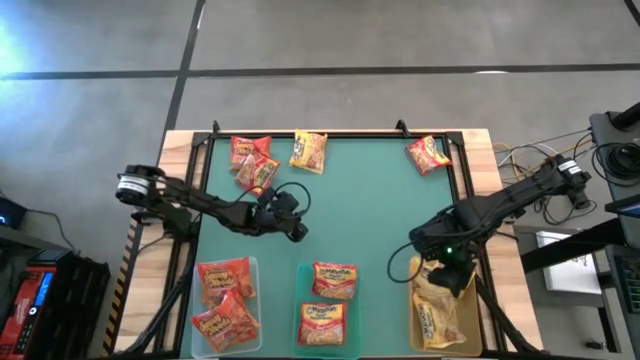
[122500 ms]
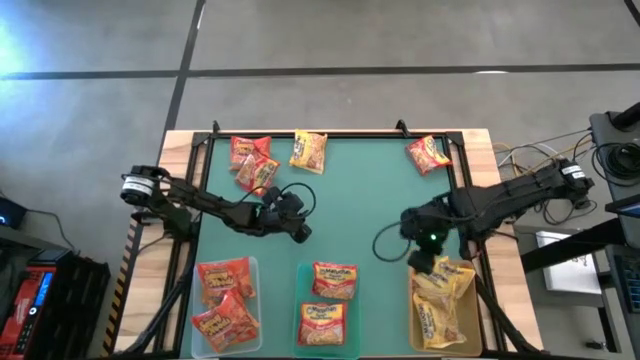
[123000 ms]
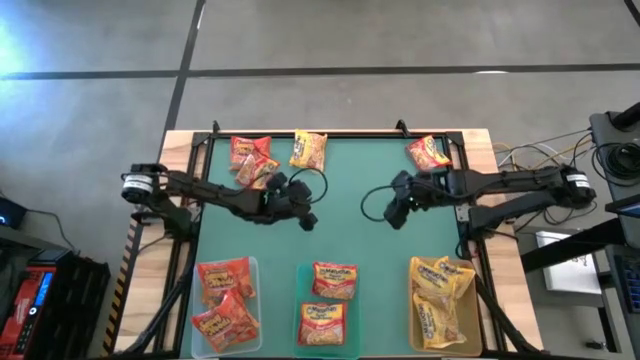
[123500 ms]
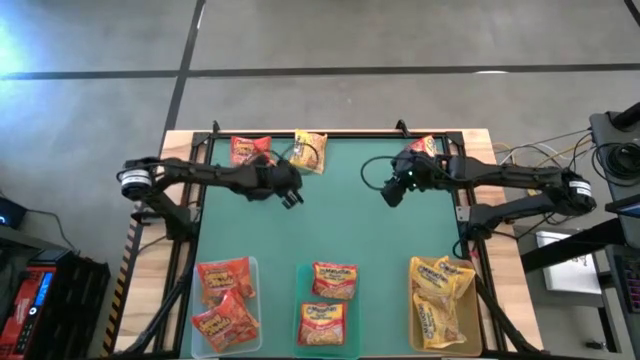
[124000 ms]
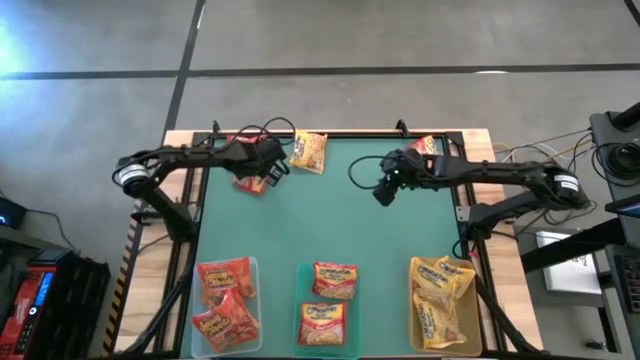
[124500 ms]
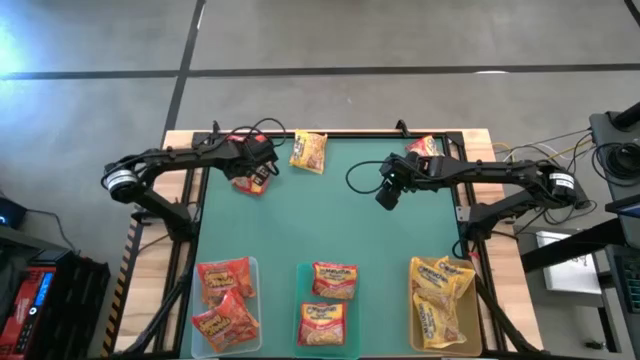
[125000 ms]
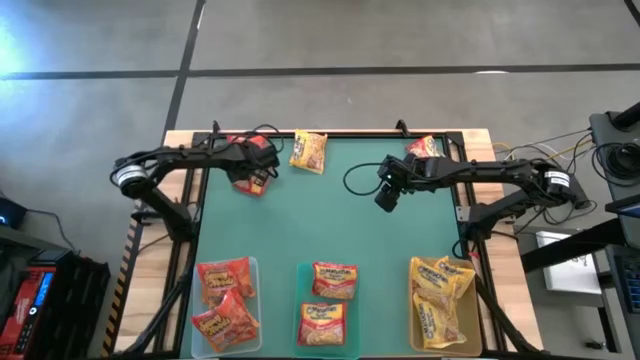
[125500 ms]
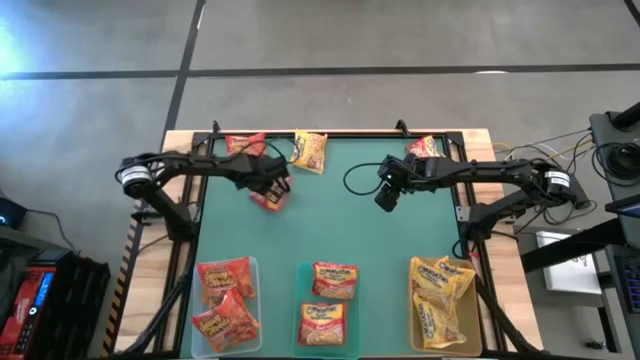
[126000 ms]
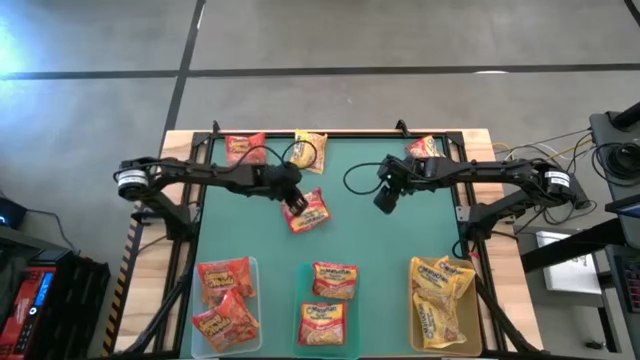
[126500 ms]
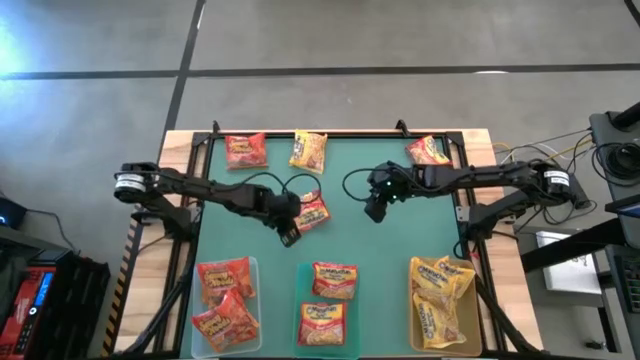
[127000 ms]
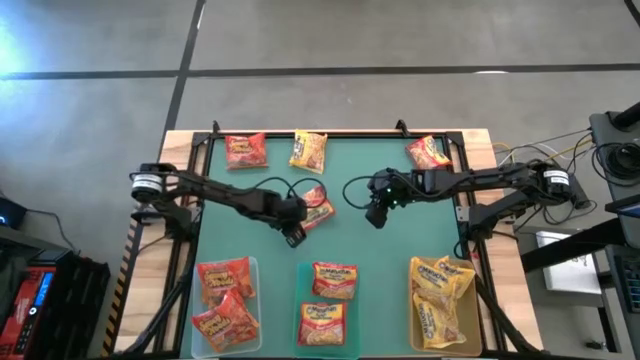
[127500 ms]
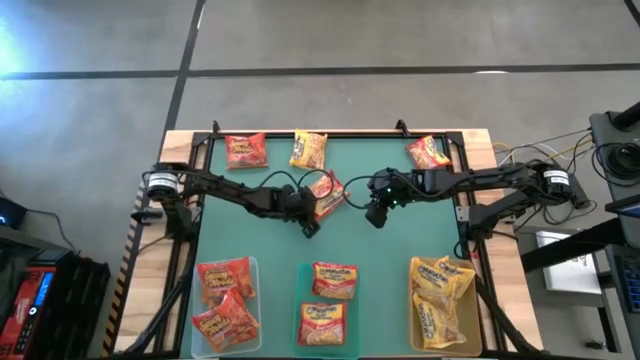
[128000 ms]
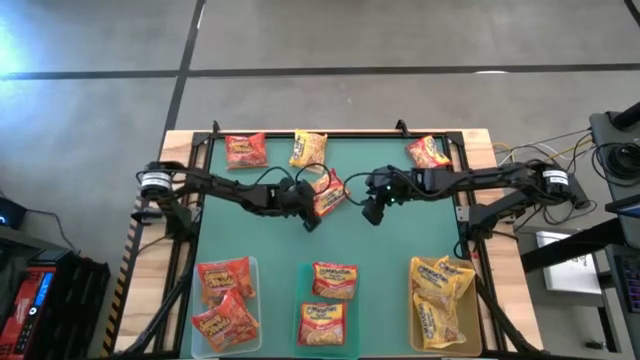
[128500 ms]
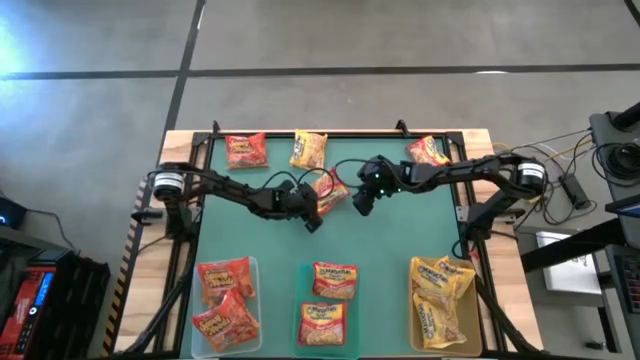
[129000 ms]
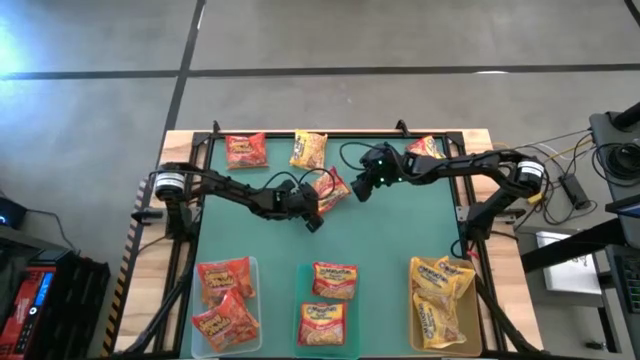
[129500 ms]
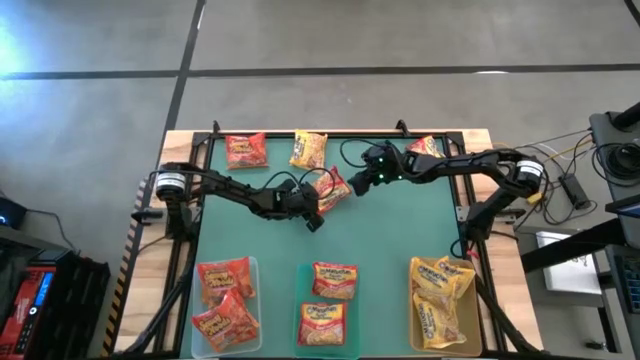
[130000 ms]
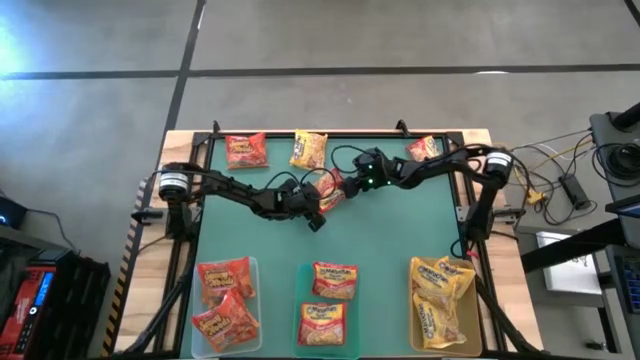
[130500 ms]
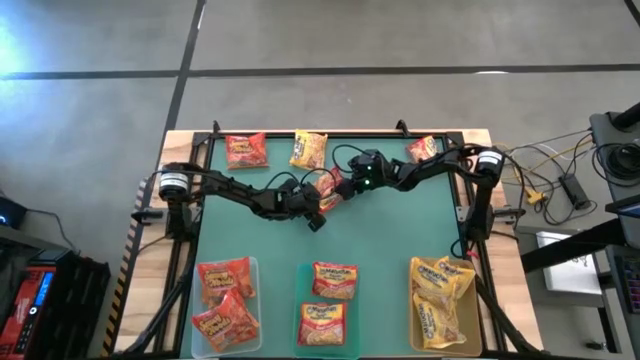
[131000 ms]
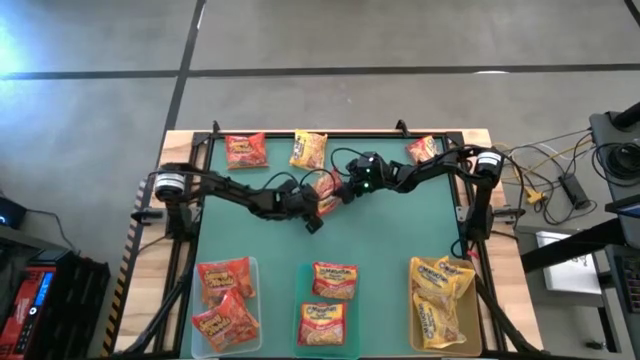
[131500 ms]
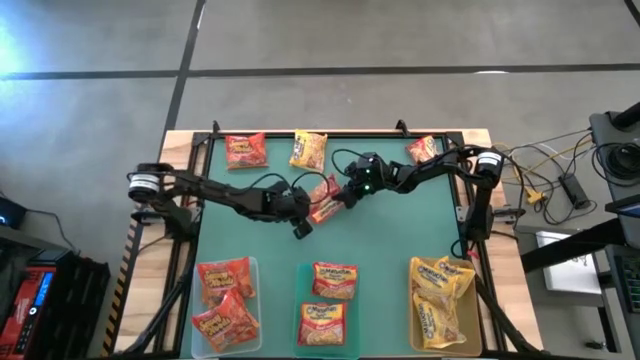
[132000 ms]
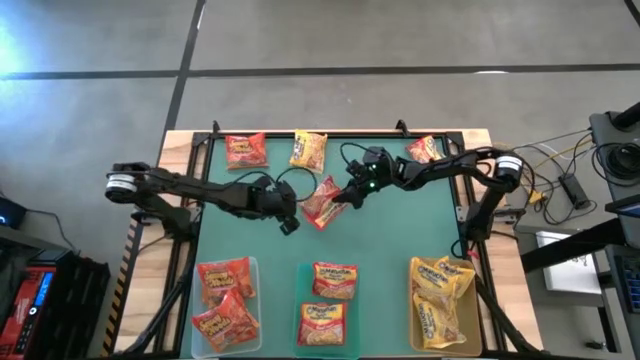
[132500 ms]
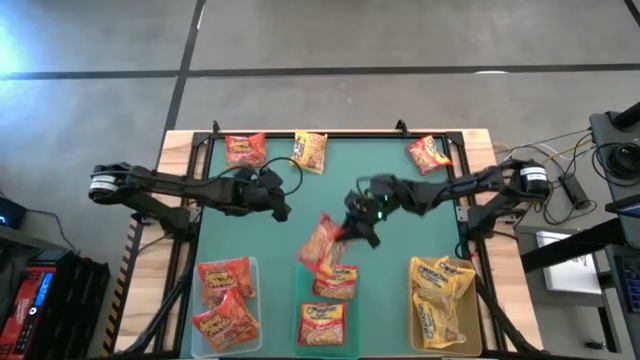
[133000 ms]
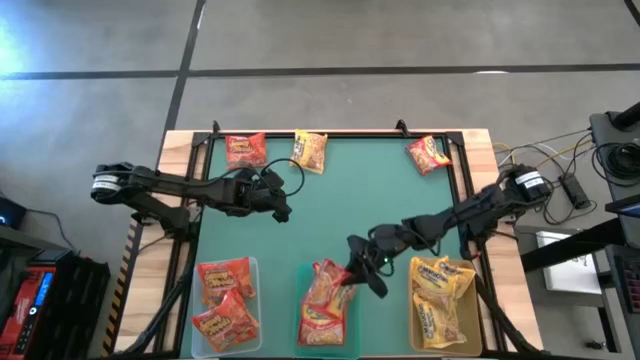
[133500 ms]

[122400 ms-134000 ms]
Task: Sort Maruchan noodles
Put the red noodle pack into the green bin

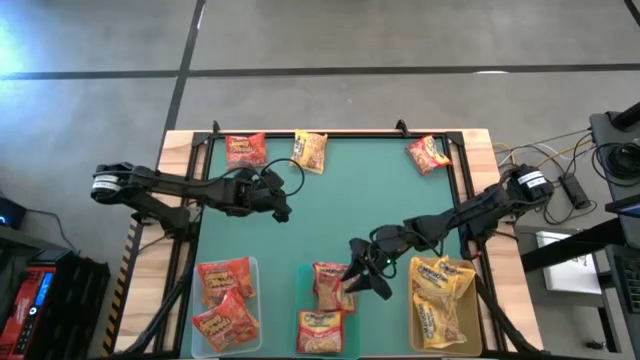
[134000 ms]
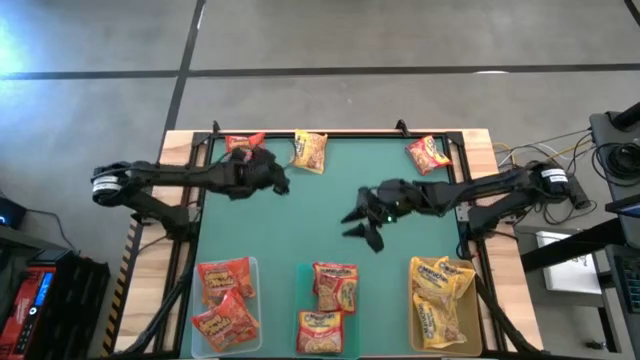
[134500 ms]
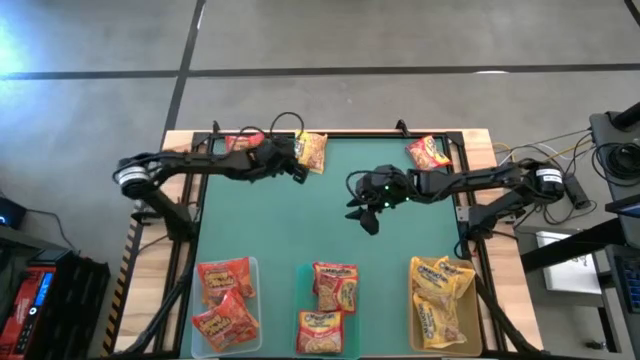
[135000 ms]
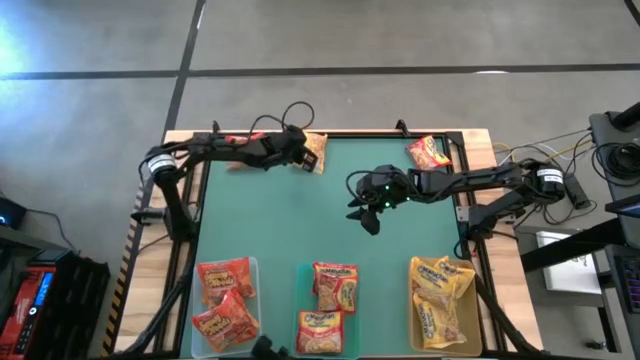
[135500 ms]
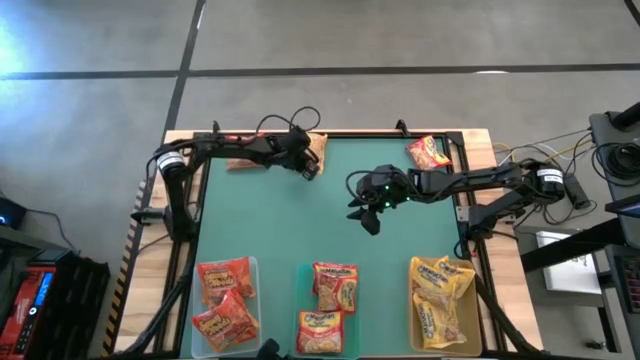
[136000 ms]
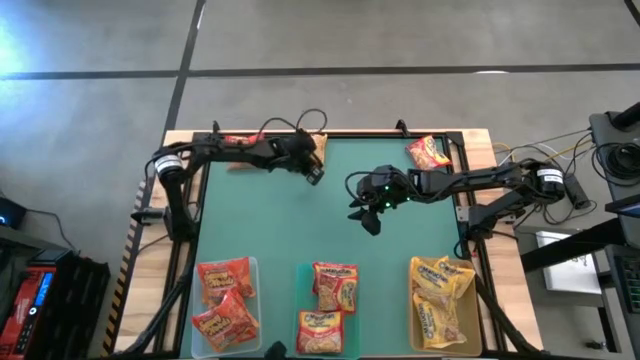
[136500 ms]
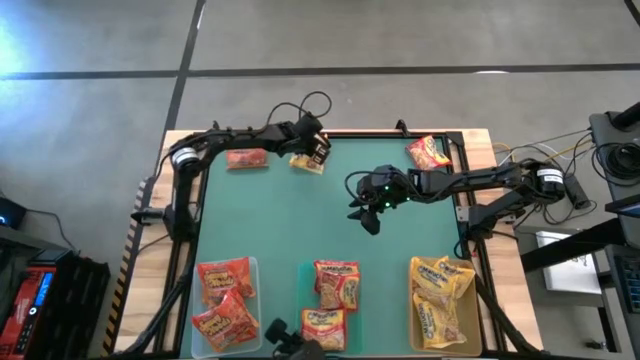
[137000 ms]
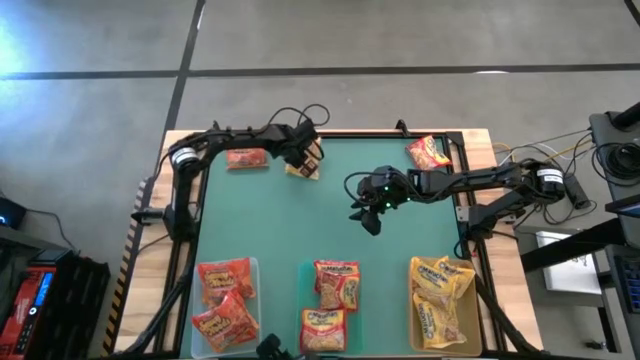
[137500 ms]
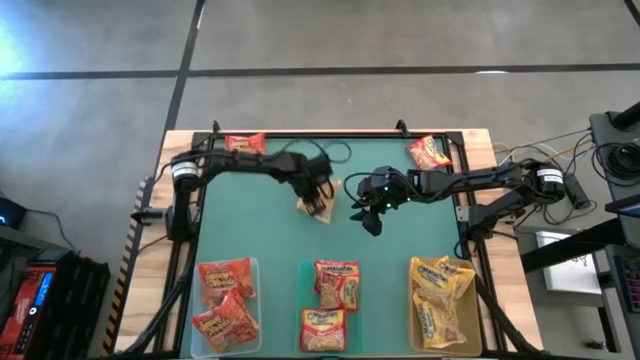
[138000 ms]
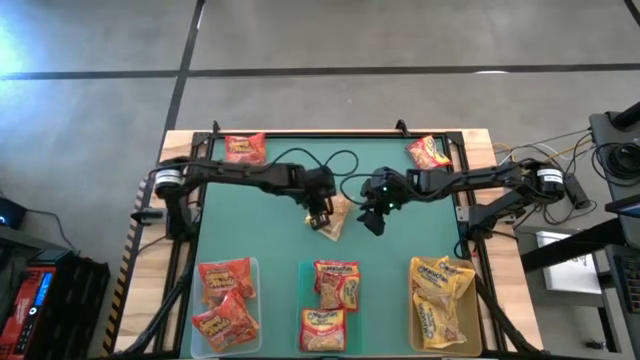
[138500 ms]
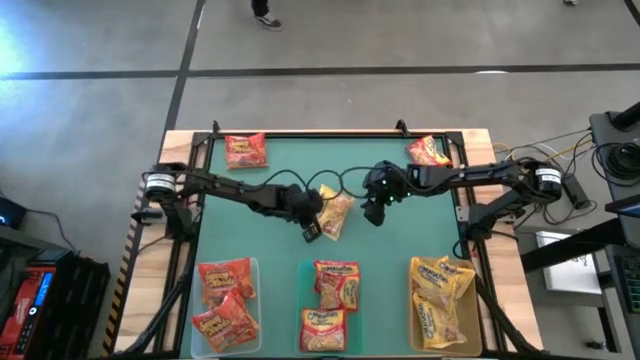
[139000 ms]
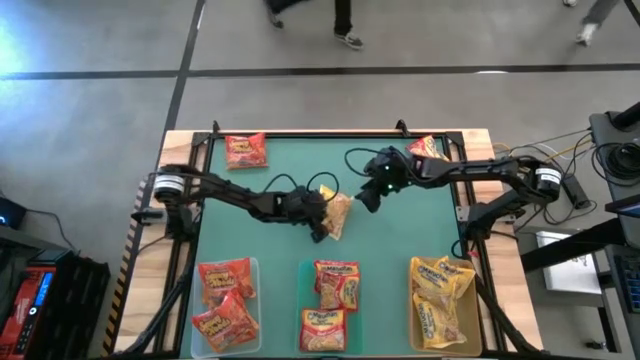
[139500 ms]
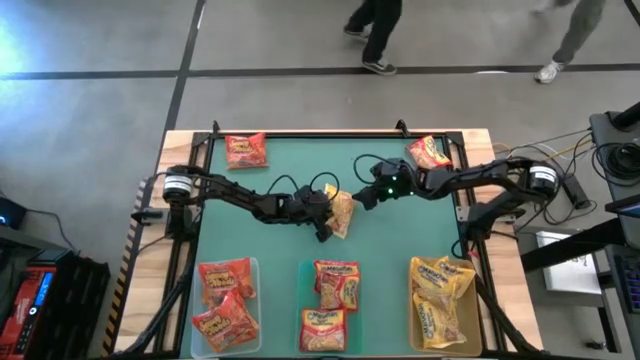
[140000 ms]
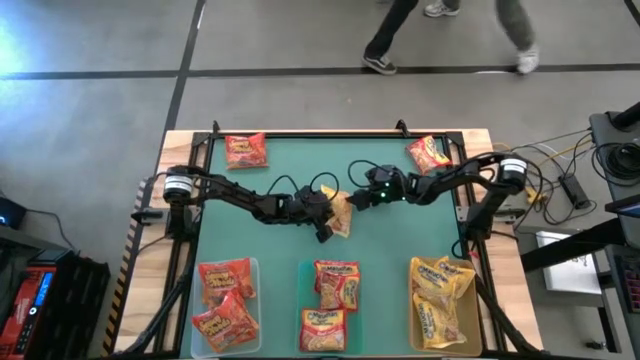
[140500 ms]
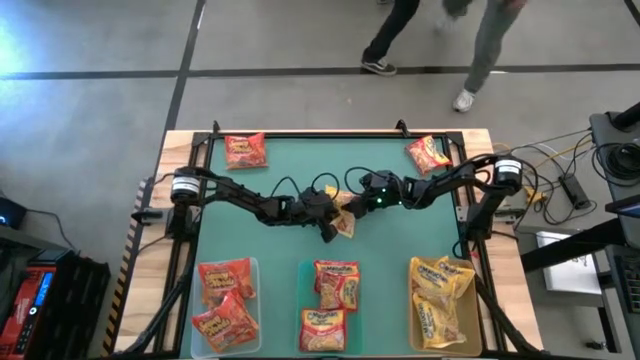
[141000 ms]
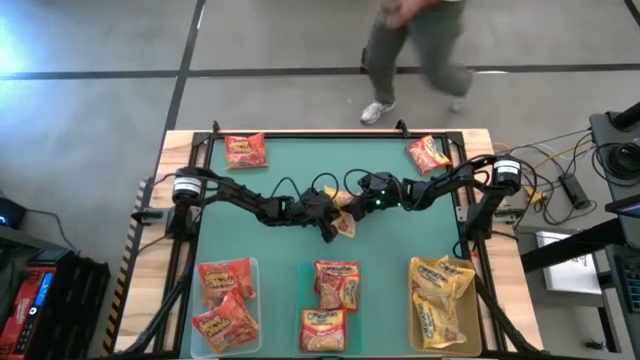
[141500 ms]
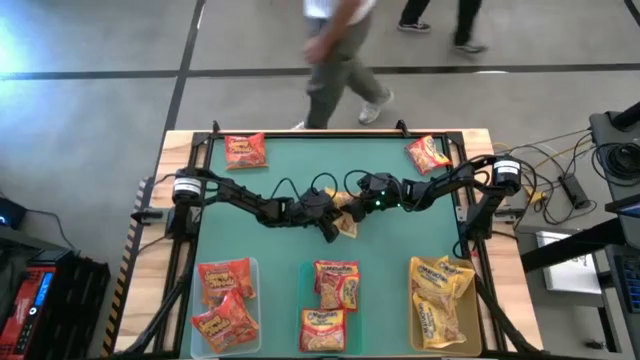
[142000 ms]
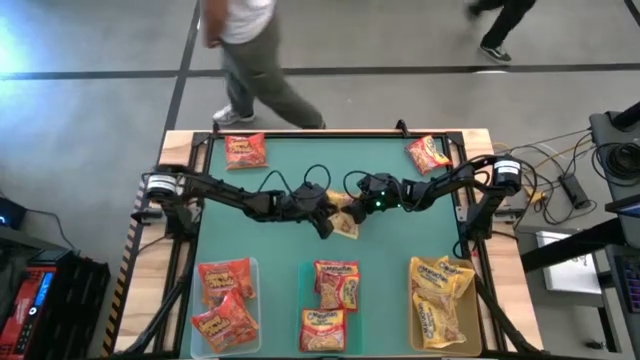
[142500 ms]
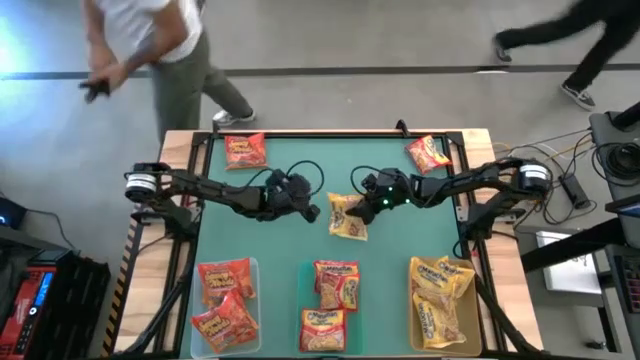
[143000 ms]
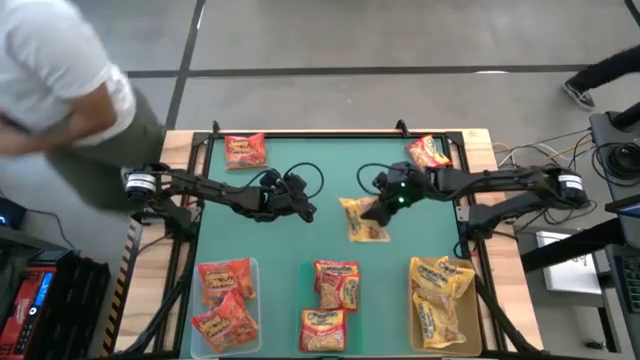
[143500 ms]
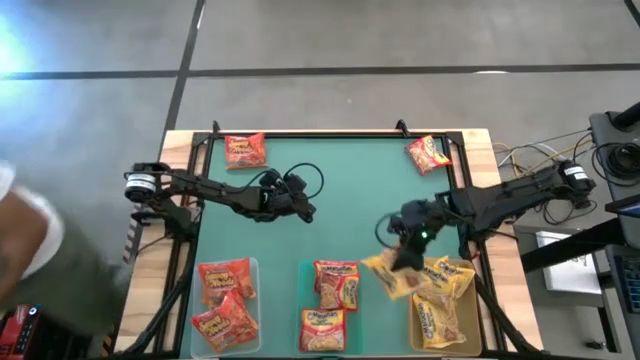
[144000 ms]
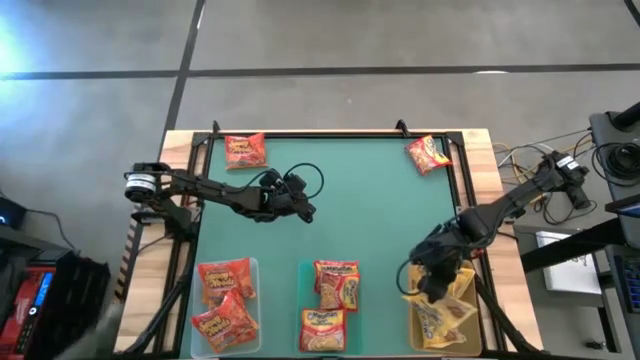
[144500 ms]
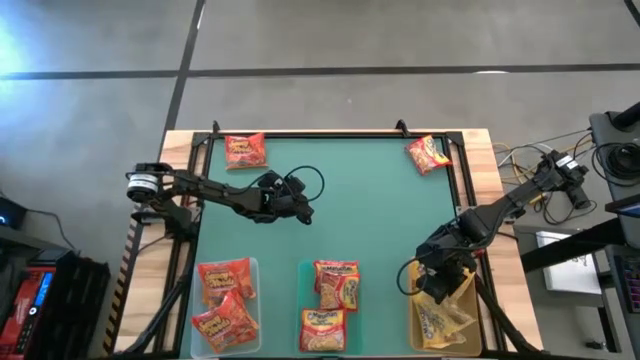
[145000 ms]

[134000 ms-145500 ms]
Put the yellow noodle pack into the orange bin
